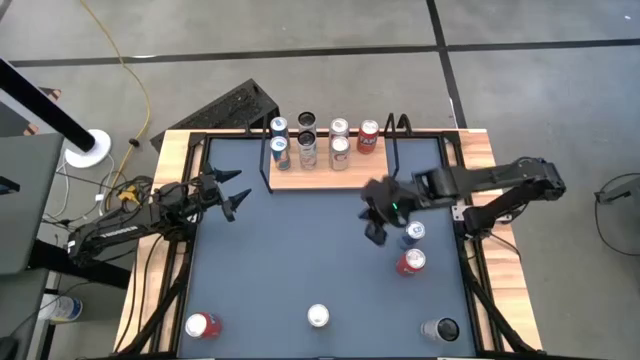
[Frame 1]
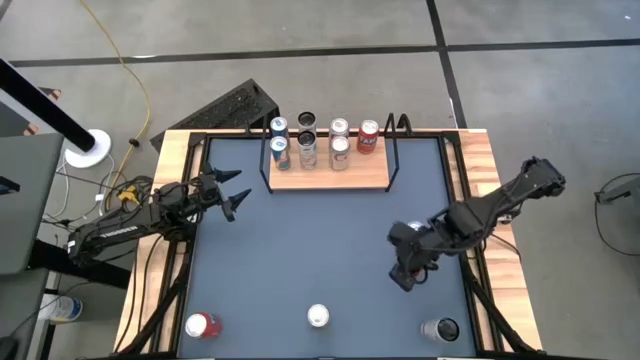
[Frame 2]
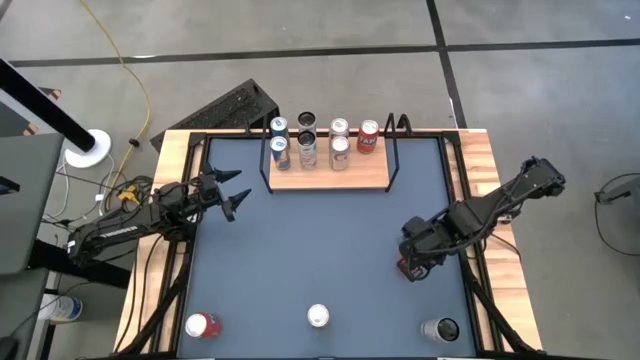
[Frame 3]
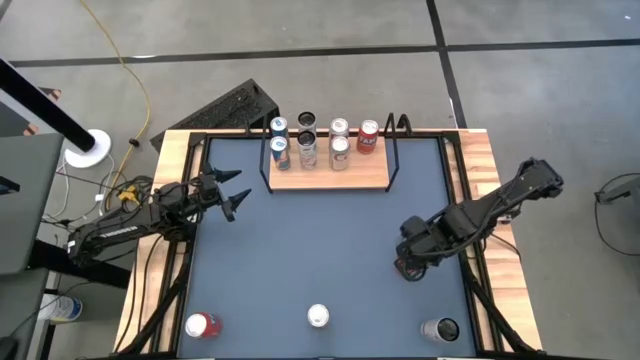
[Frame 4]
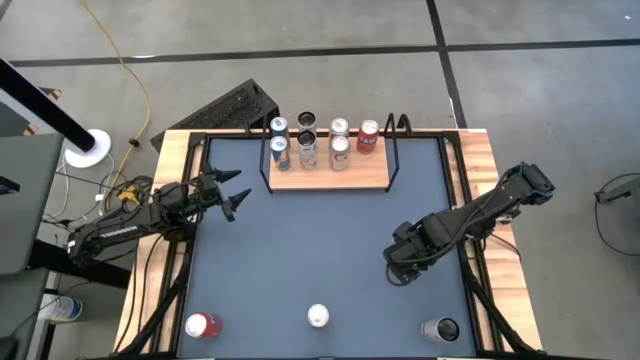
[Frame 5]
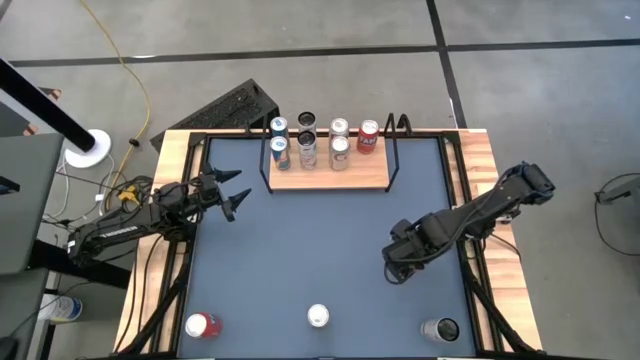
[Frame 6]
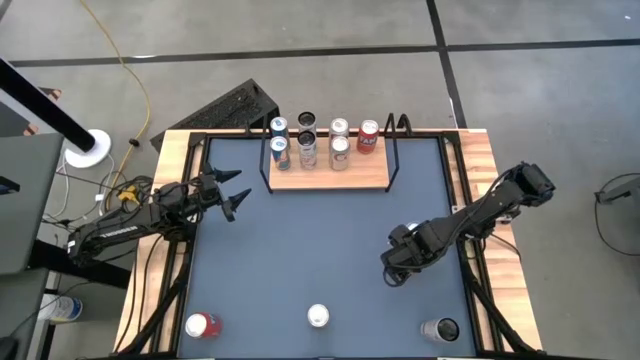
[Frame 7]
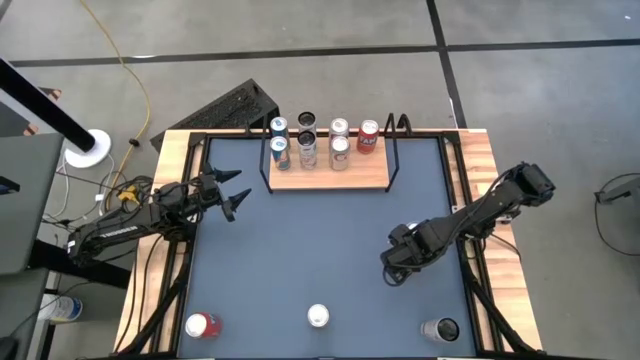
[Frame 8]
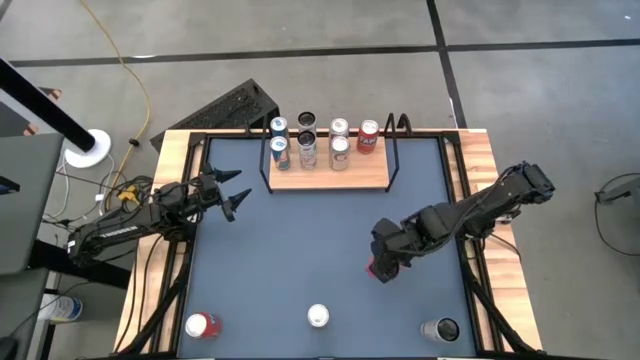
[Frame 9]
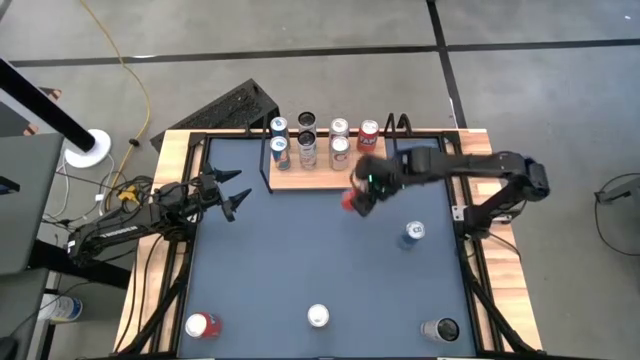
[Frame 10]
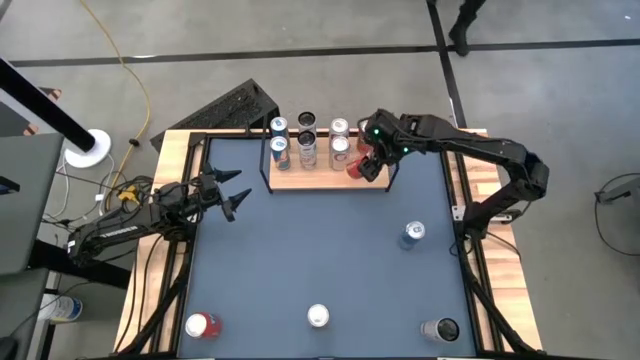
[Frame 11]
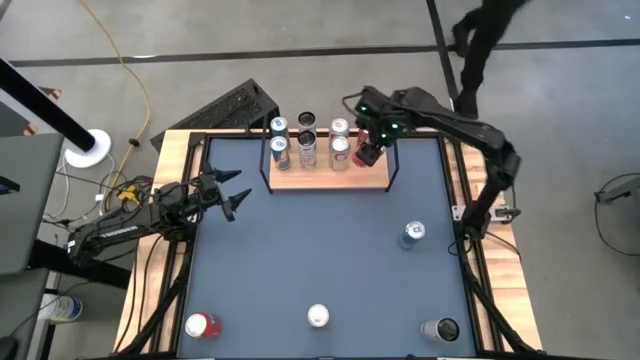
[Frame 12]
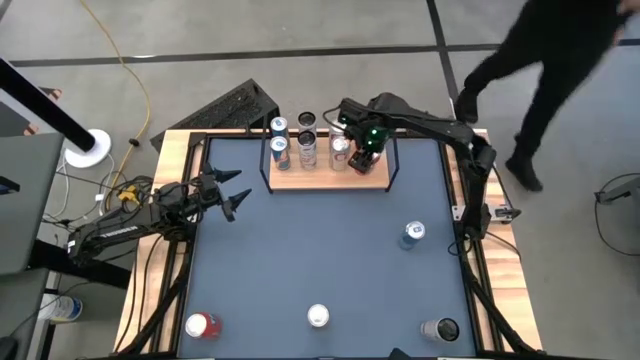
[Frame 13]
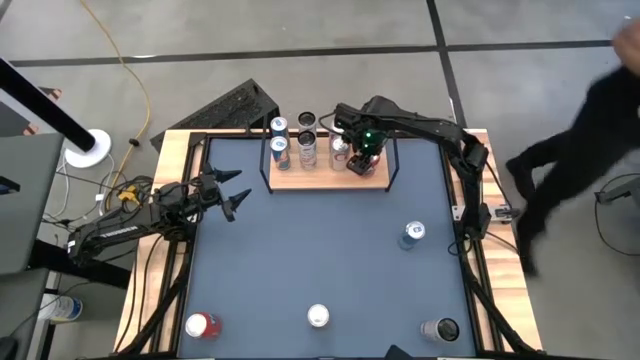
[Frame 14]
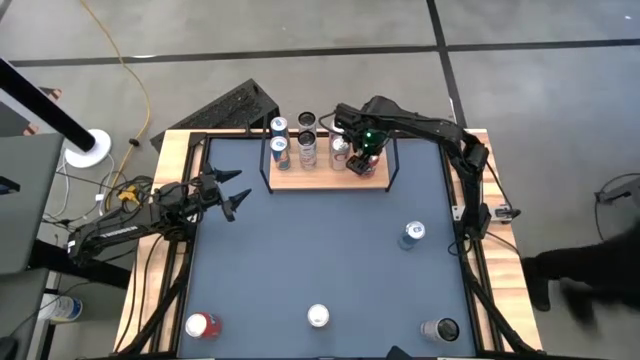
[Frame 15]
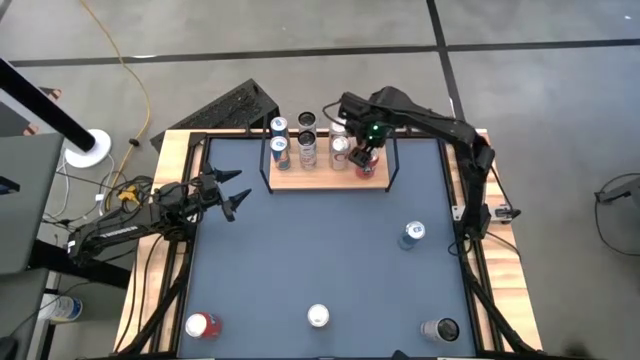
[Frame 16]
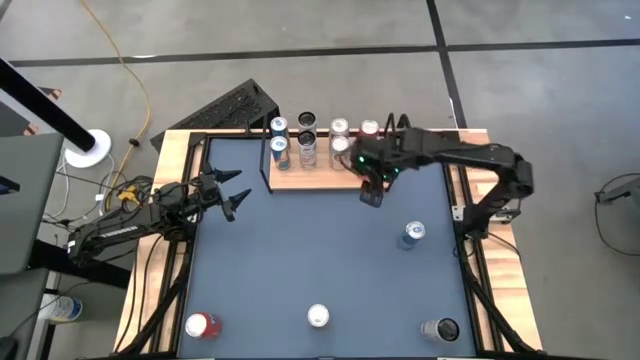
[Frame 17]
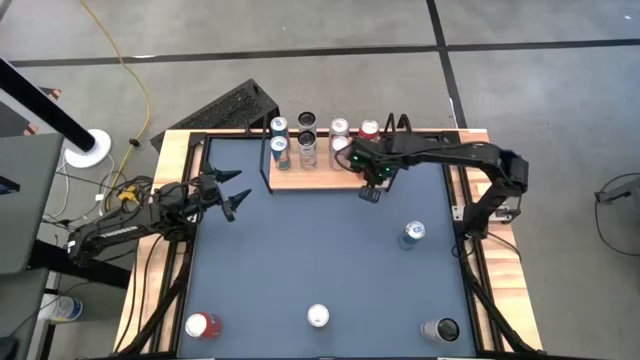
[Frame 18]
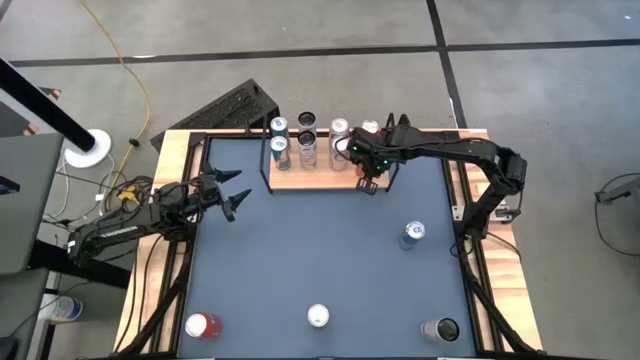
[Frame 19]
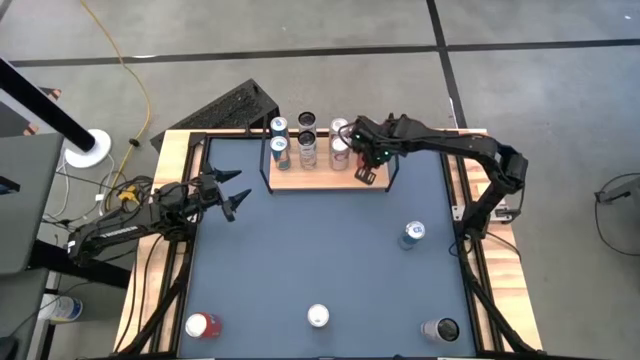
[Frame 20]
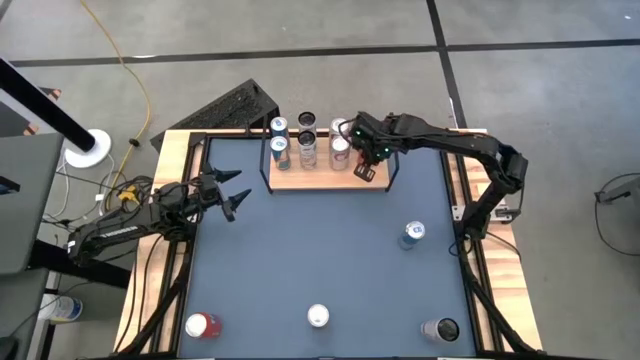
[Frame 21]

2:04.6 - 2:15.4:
Task: Place canned beverage on shelf
Put the right orange soda can onto the shelf aligned with the other orange soda can

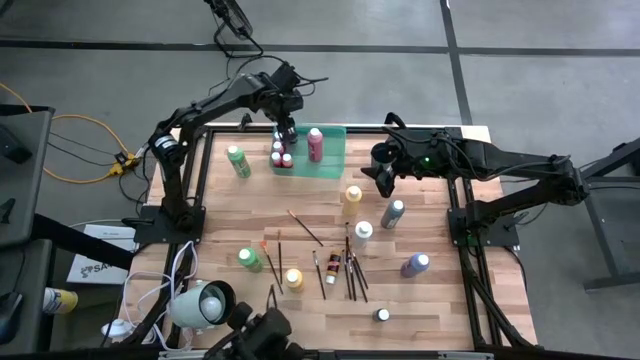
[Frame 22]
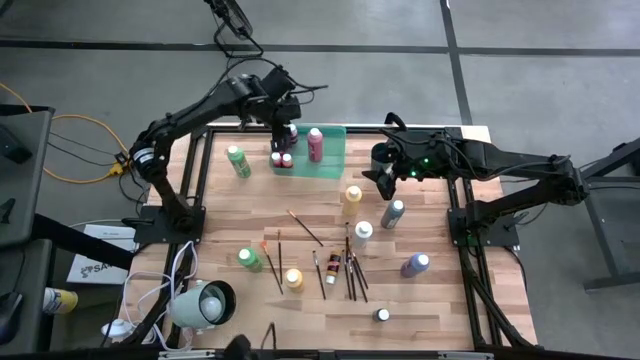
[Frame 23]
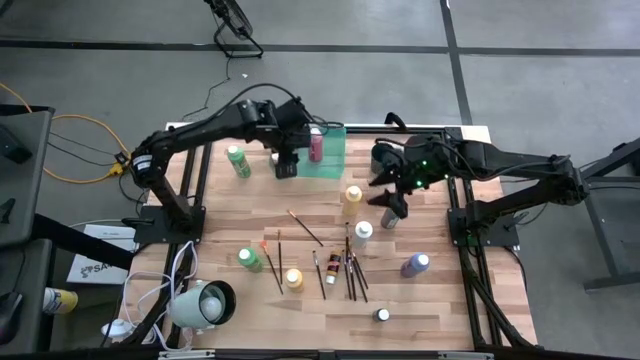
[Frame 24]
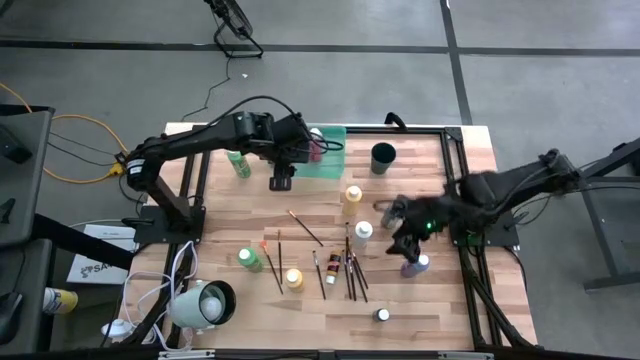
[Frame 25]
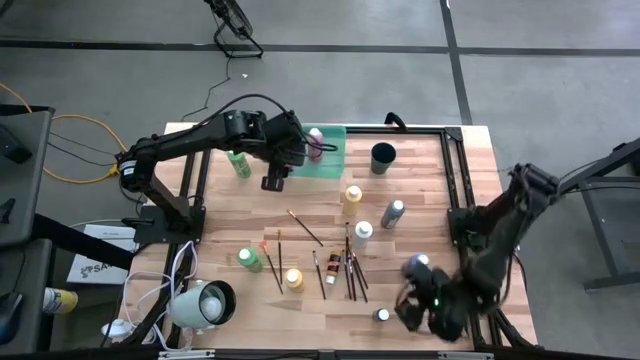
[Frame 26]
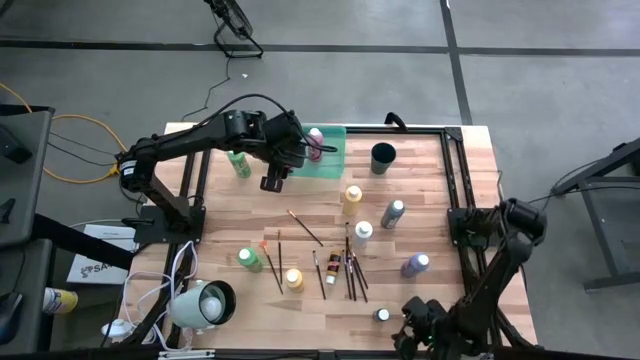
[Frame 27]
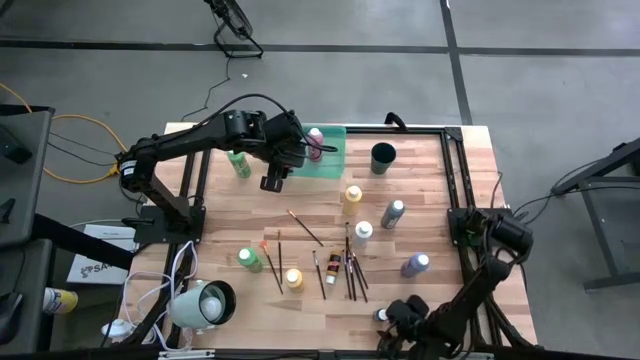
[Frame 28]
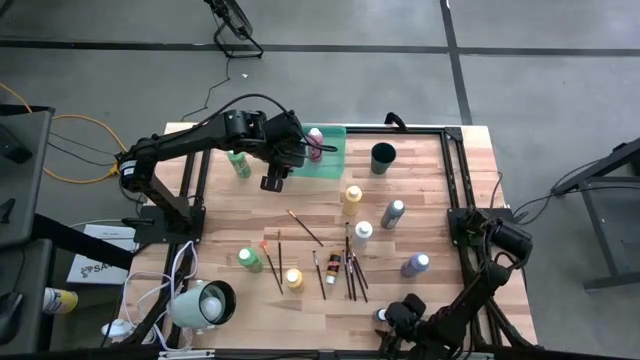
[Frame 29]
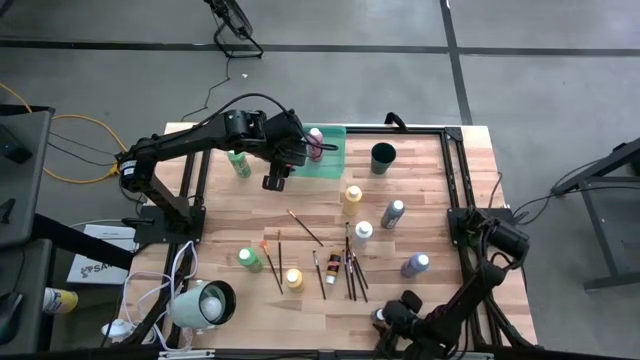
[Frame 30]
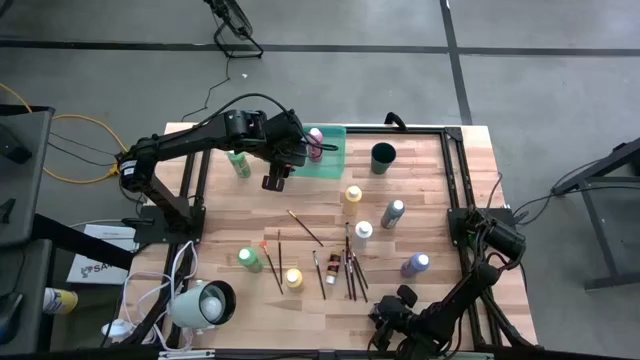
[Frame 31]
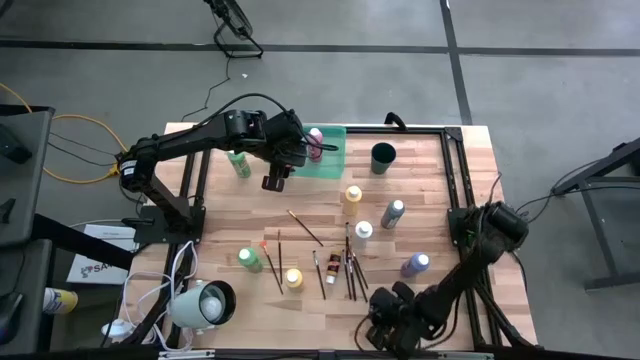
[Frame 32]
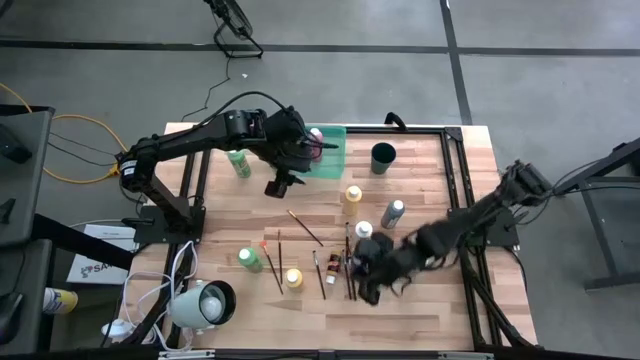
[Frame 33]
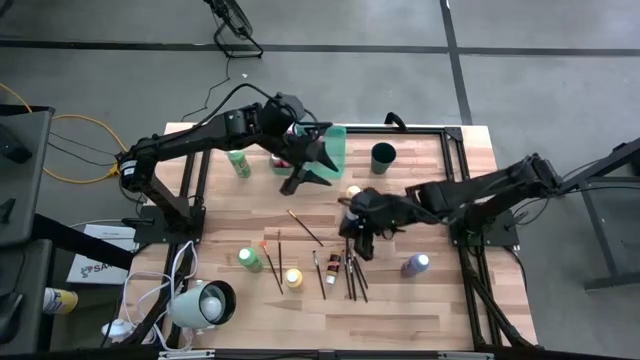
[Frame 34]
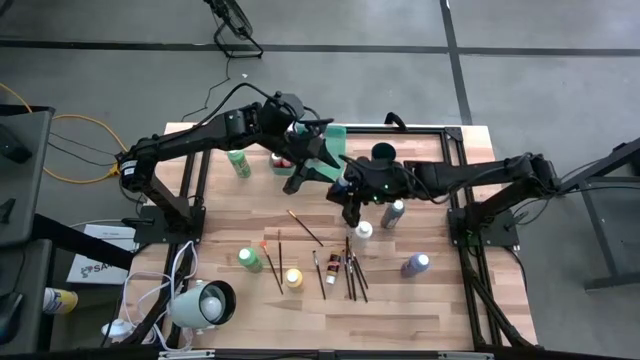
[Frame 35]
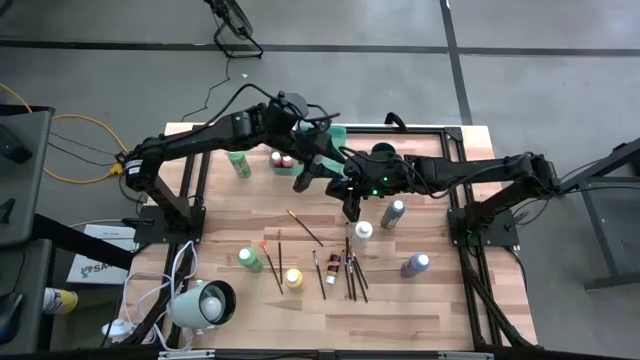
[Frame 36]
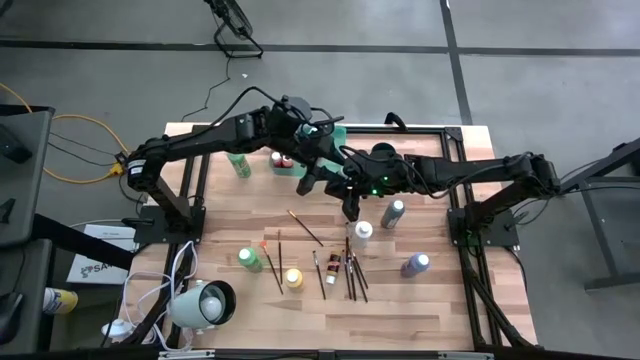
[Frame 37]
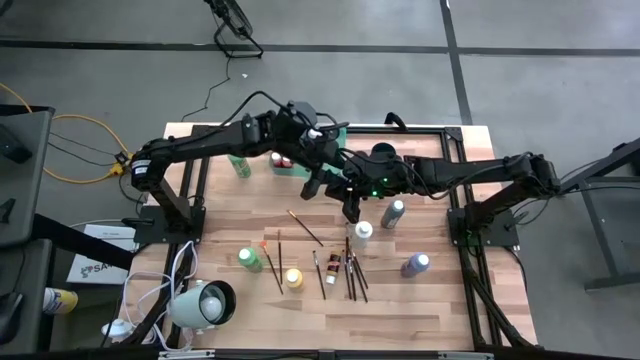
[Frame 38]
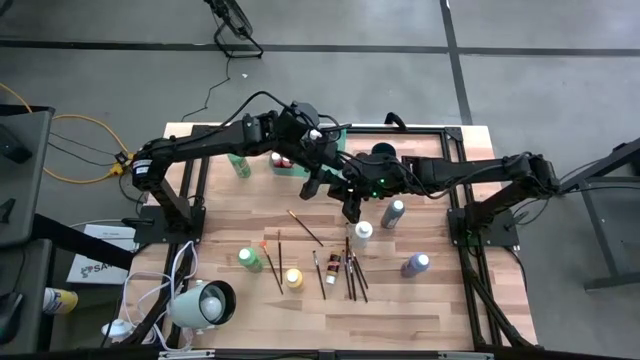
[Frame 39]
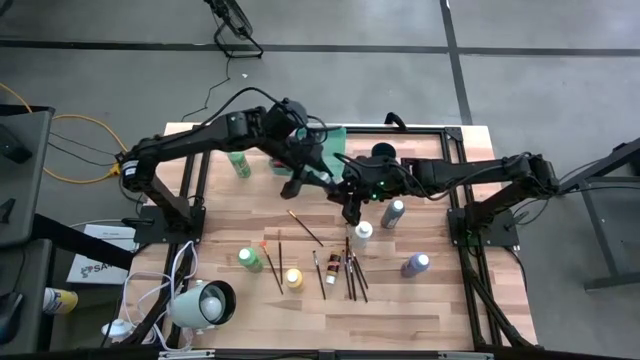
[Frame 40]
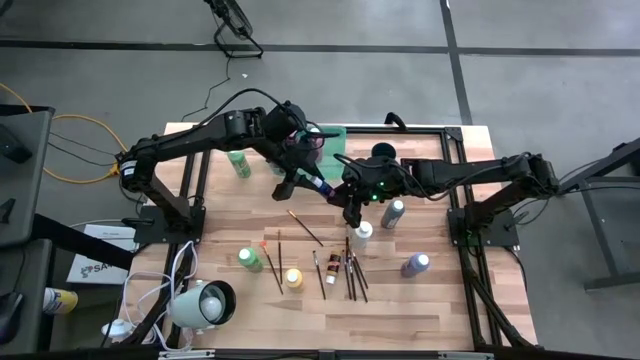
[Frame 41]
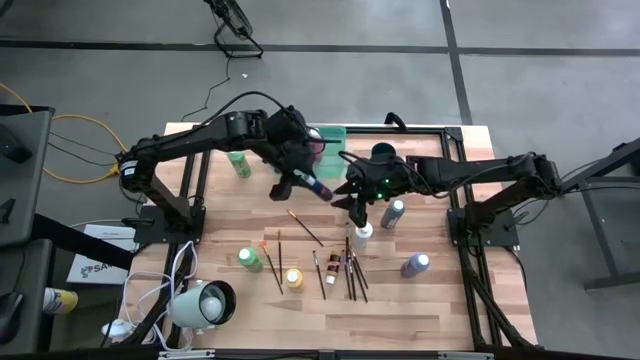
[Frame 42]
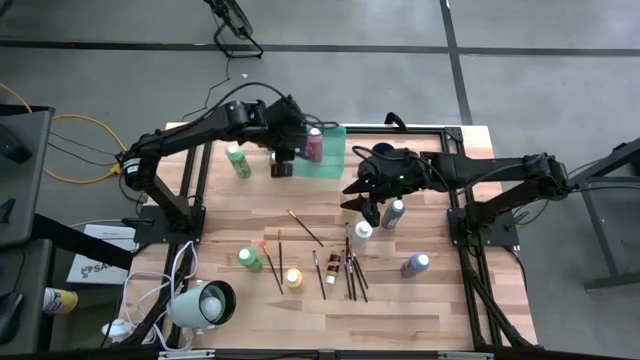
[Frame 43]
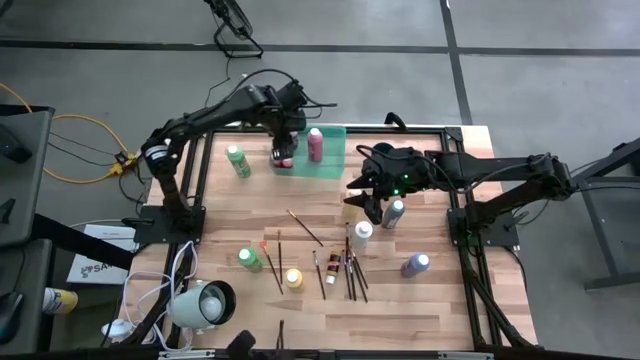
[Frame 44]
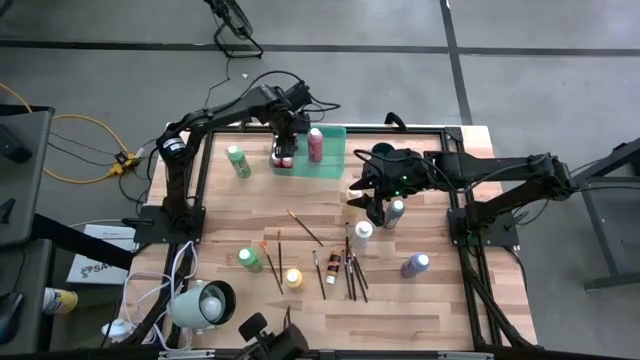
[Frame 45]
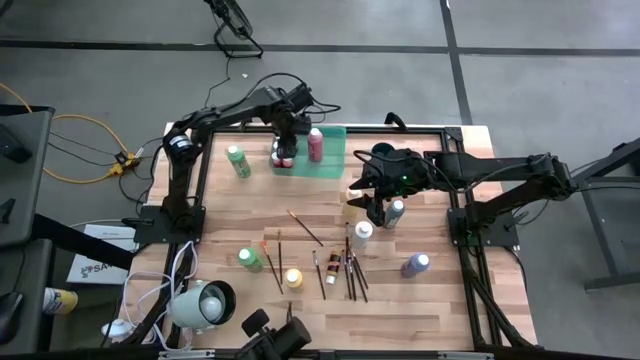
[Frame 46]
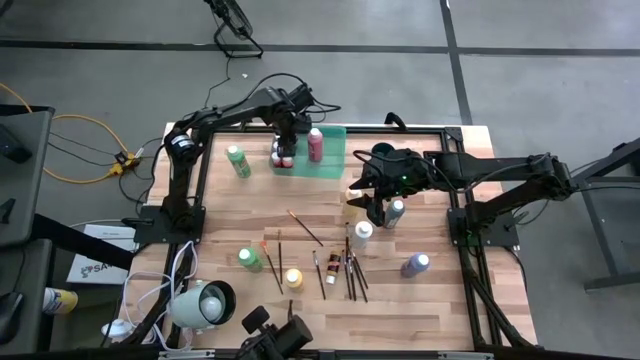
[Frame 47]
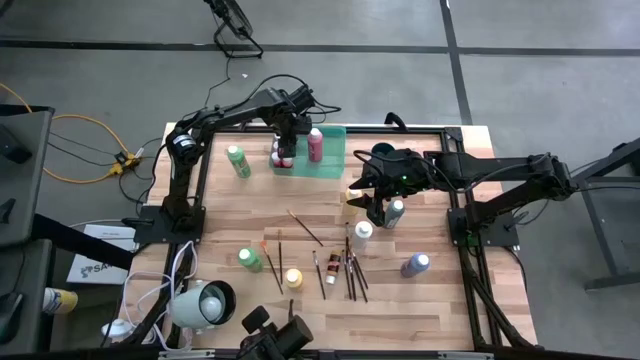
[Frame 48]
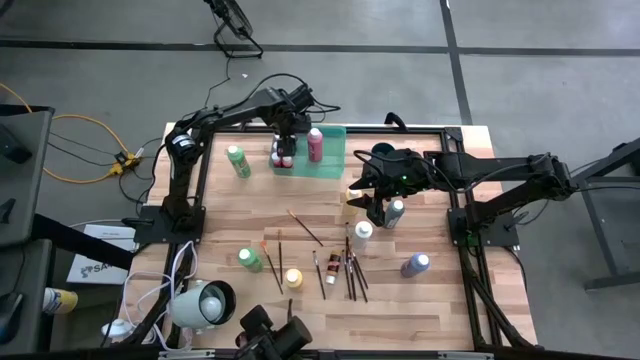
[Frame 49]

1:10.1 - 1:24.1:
Task: Pick & Place Paint Supplies
Put the small blue paint bottle into the green bin
